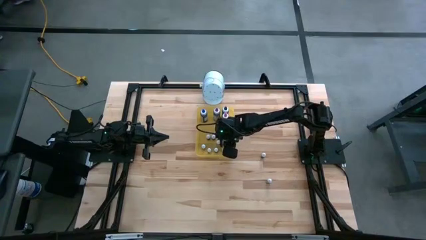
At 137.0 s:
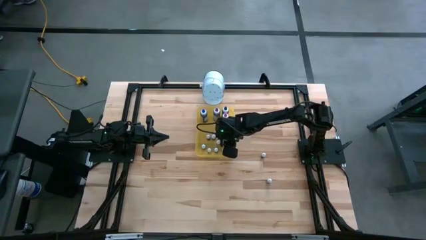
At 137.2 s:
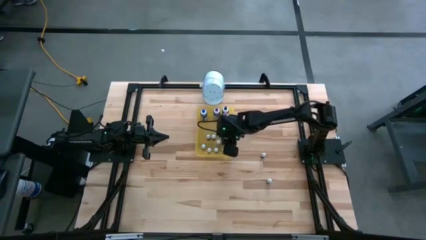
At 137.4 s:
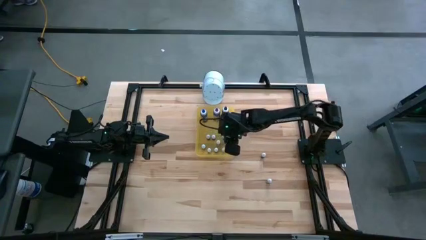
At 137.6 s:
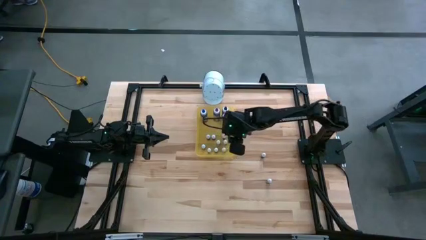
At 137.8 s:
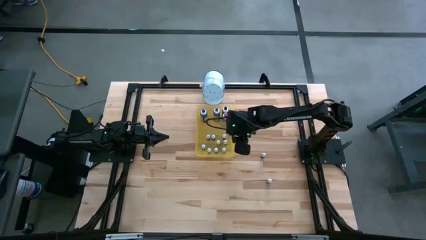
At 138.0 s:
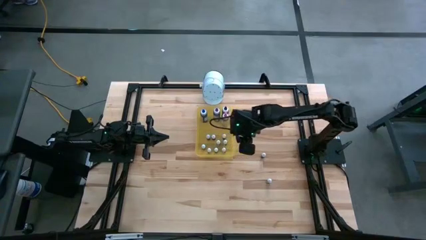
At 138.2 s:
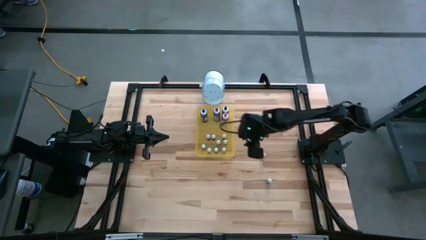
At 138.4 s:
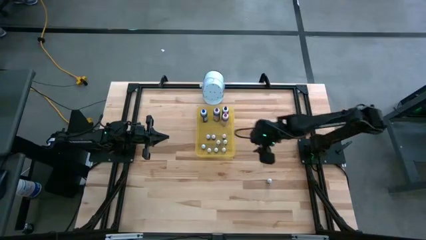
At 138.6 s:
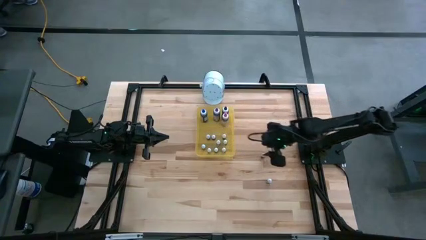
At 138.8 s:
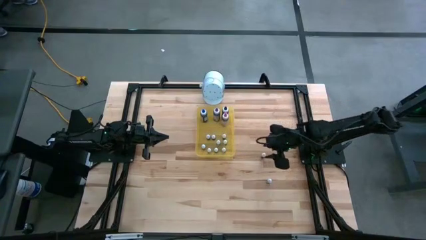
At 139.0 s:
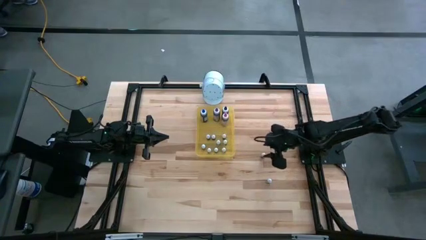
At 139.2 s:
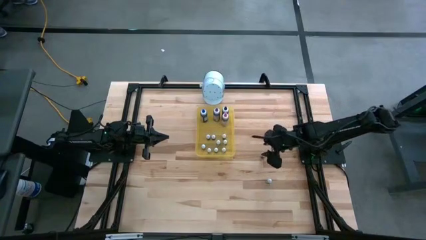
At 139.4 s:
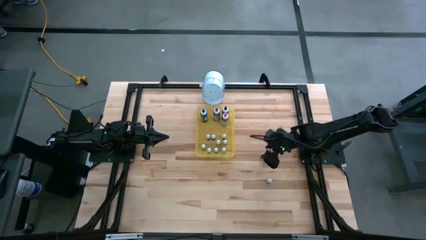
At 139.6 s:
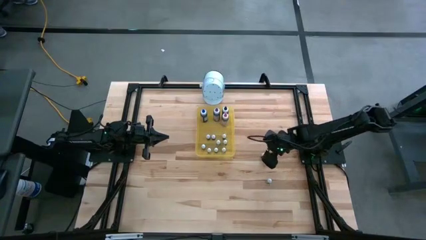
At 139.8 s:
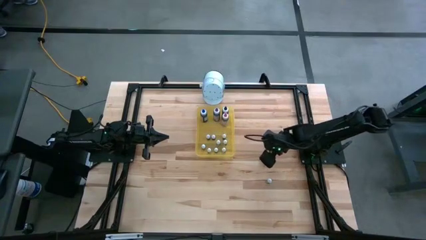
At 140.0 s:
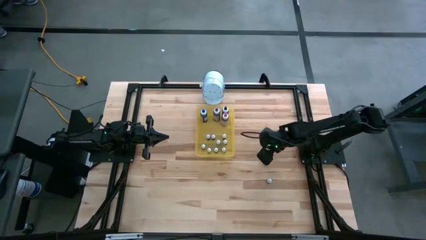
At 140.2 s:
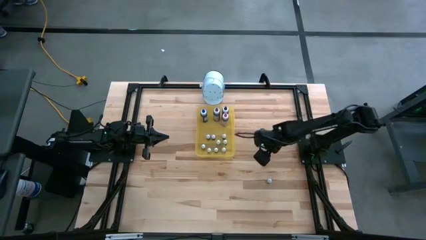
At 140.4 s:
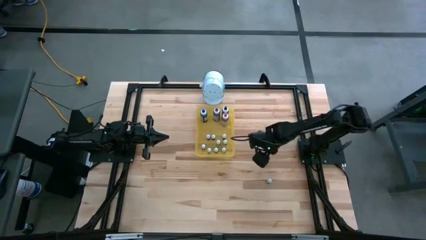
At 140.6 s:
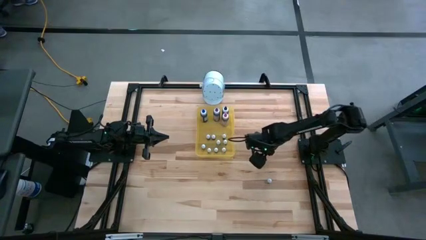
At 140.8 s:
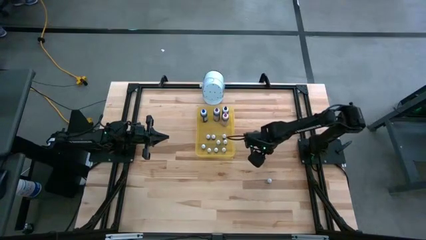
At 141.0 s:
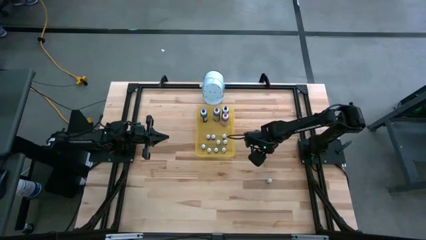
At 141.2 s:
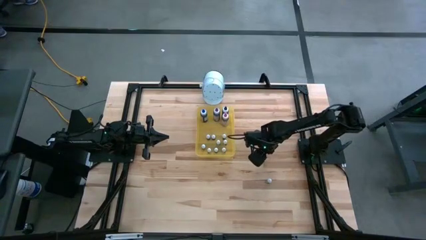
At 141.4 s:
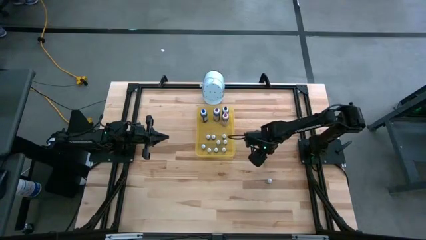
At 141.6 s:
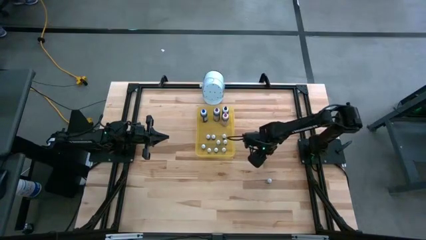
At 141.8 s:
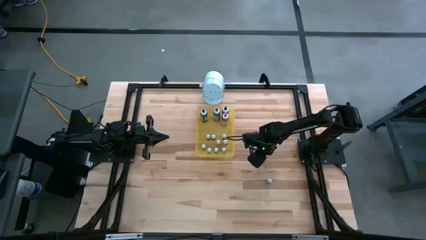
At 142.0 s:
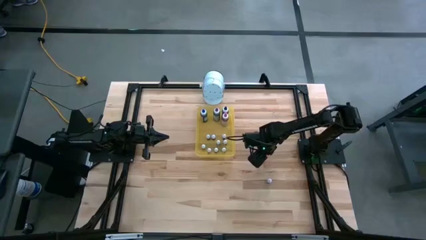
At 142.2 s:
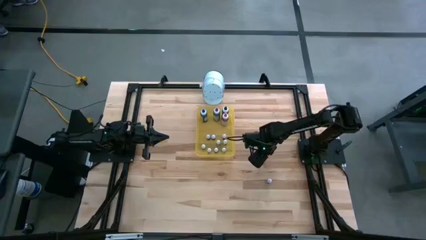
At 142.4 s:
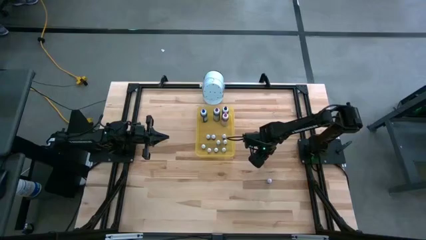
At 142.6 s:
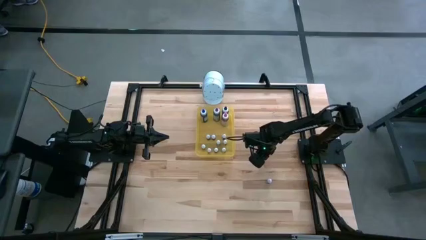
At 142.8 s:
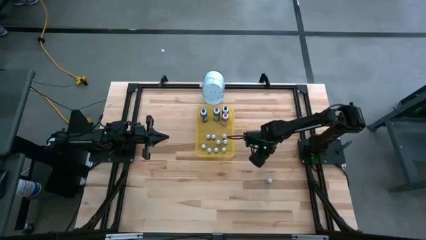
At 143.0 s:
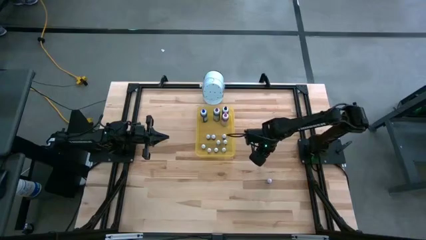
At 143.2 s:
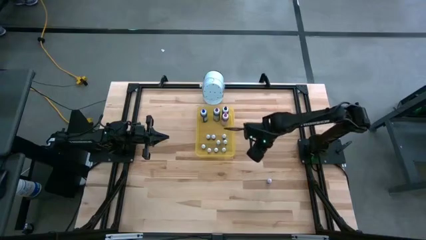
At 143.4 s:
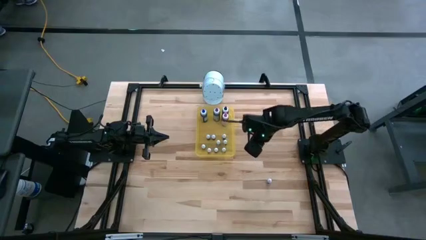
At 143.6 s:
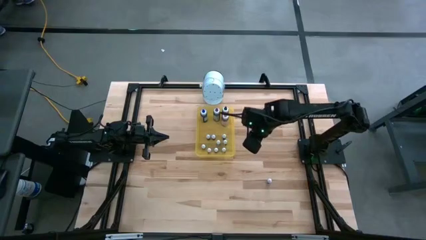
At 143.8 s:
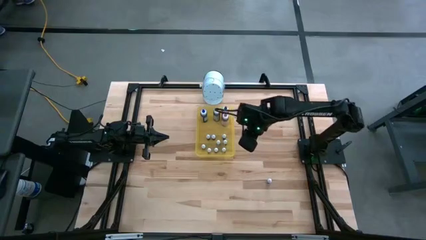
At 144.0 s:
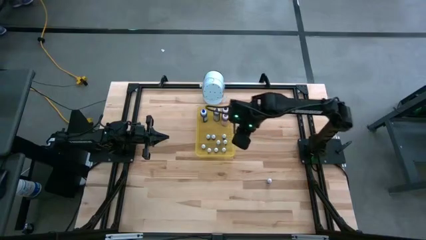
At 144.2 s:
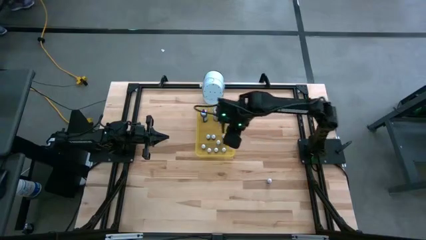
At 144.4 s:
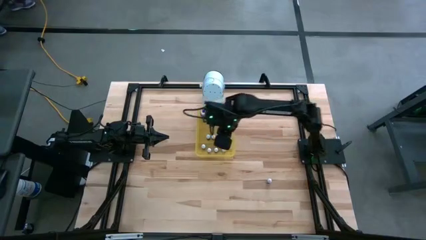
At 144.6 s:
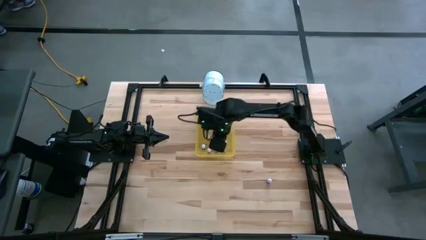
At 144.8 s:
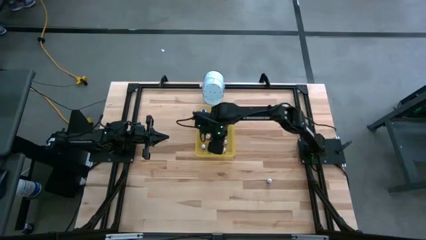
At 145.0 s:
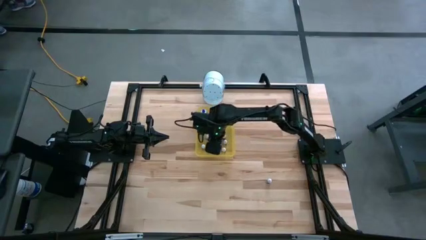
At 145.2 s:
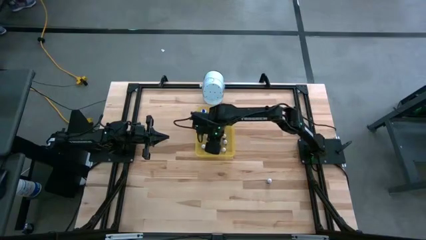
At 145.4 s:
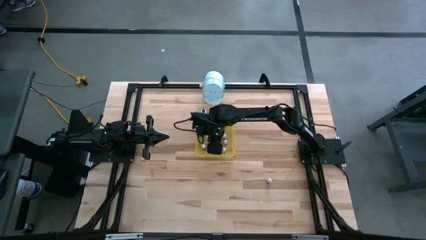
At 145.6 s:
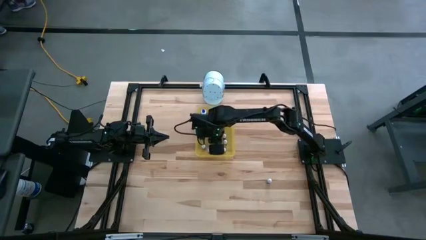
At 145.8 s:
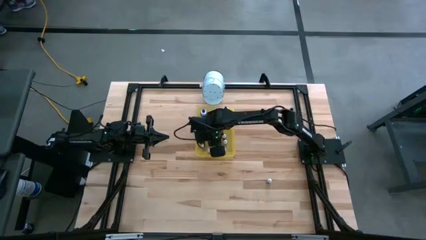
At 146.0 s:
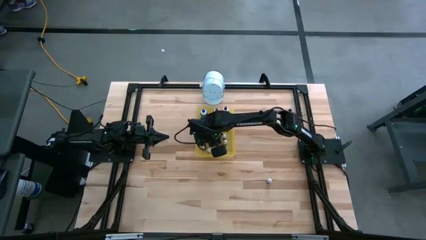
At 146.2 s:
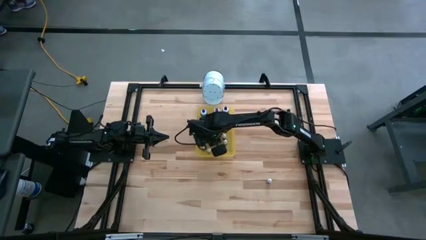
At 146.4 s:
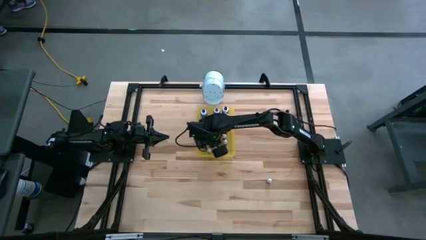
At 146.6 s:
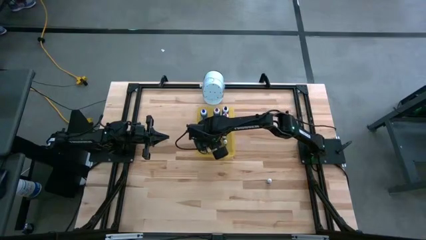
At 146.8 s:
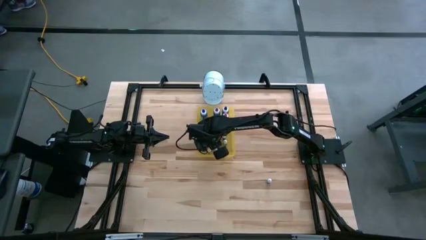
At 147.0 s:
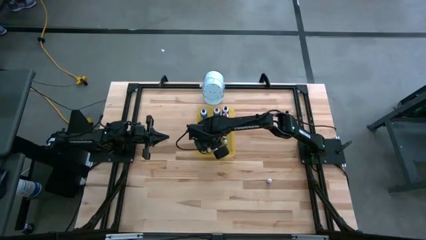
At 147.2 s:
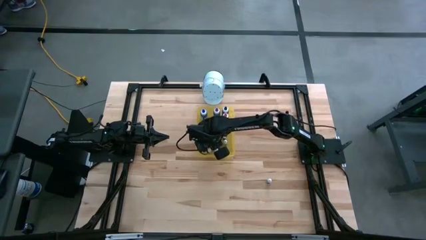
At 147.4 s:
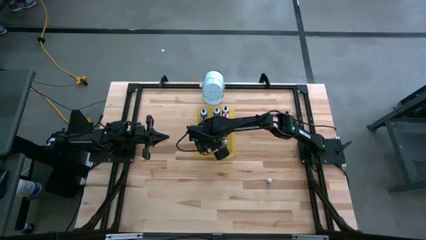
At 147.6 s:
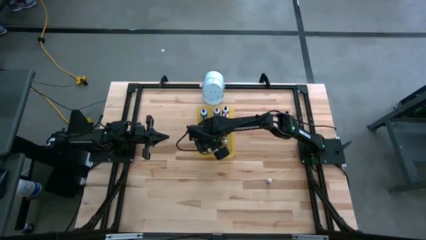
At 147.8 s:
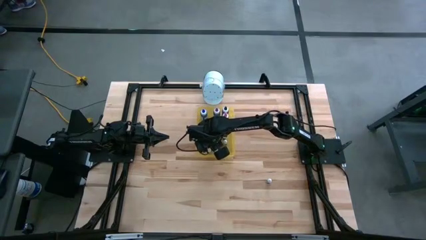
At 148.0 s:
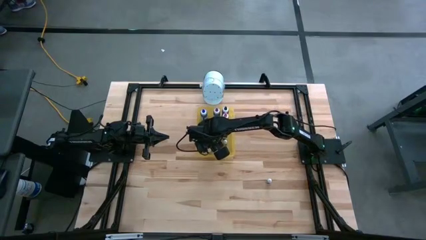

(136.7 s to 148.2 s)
Task: Pick & Place food coloring
Put the small brown coloring bottle in the yellow transparent bin
